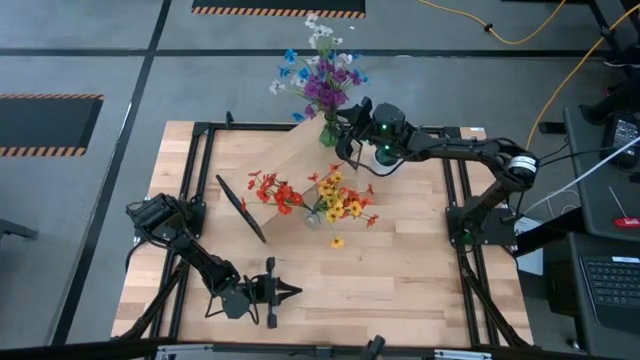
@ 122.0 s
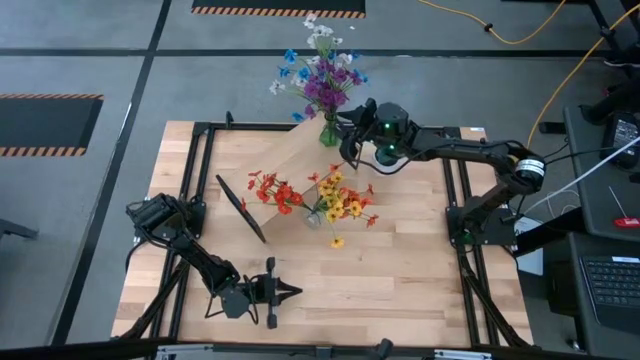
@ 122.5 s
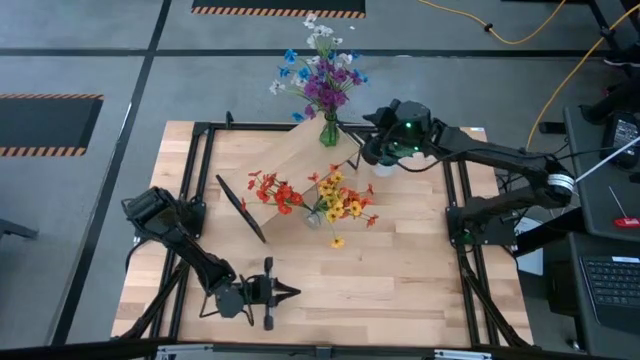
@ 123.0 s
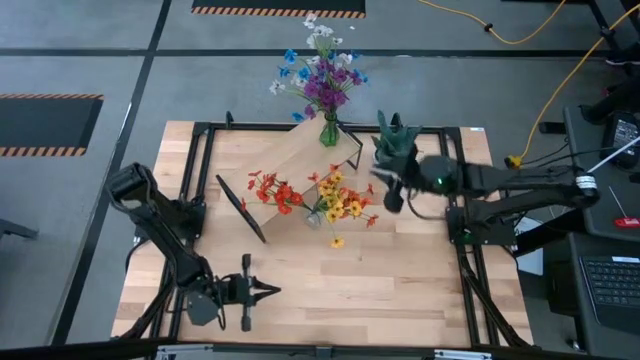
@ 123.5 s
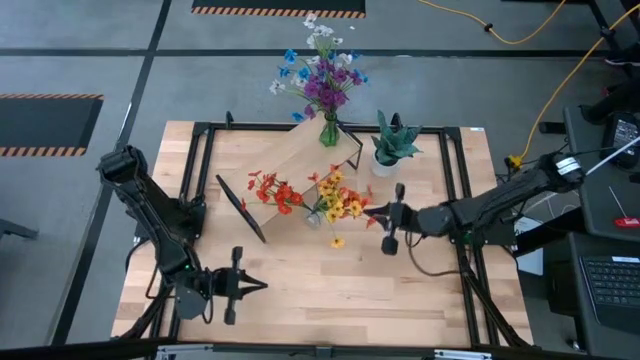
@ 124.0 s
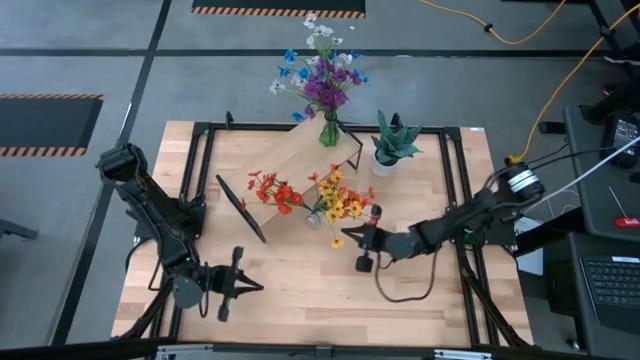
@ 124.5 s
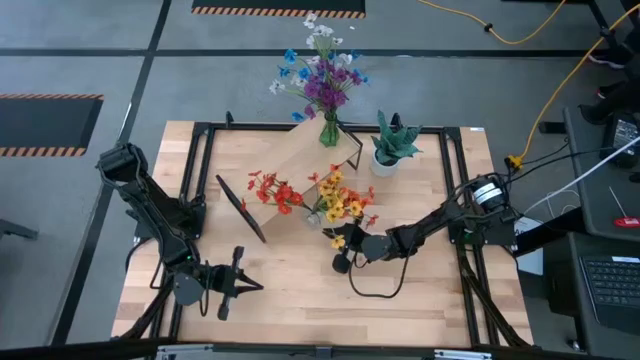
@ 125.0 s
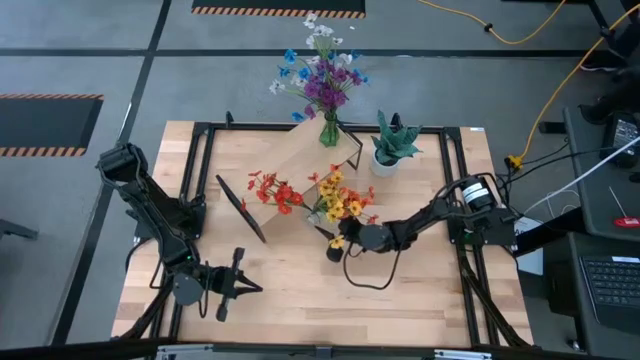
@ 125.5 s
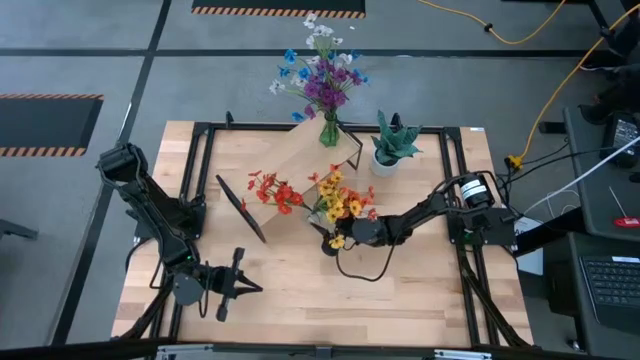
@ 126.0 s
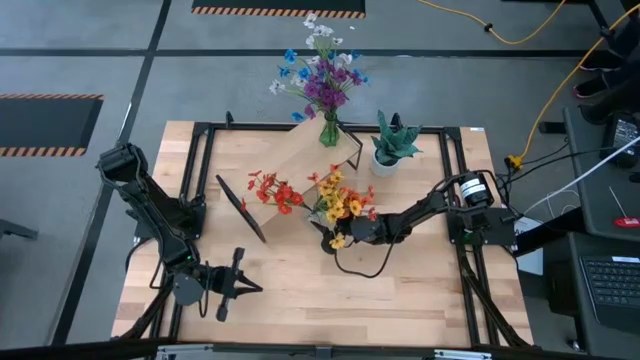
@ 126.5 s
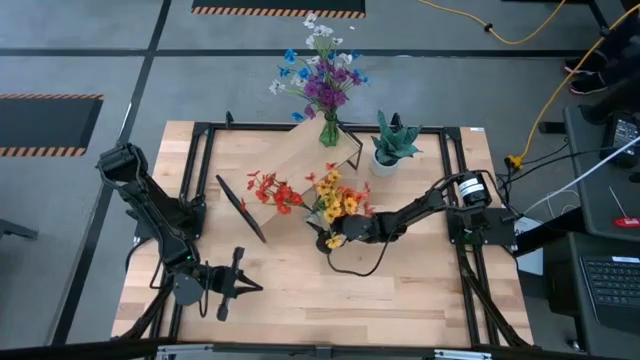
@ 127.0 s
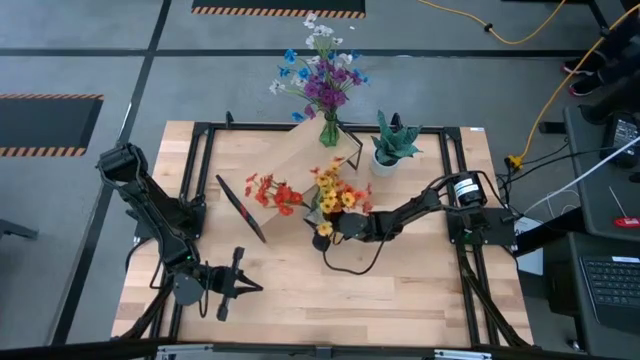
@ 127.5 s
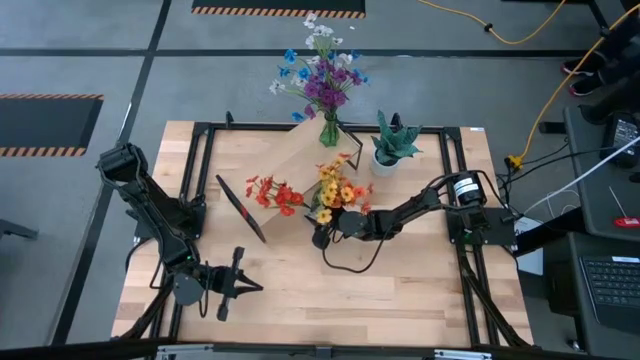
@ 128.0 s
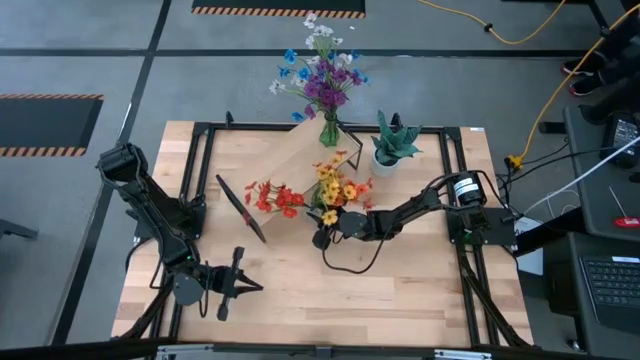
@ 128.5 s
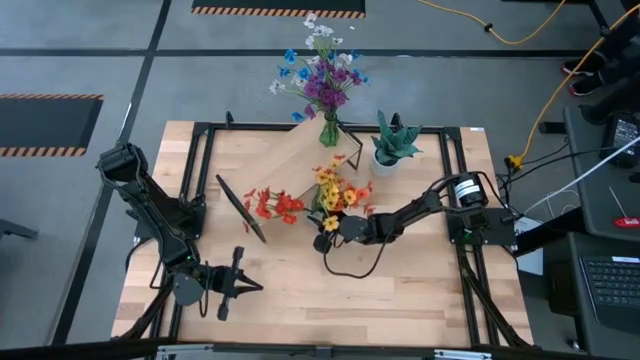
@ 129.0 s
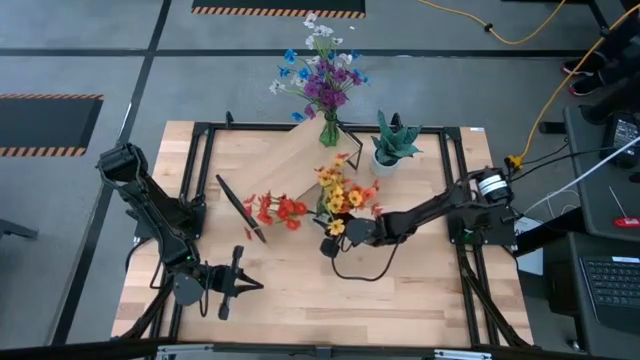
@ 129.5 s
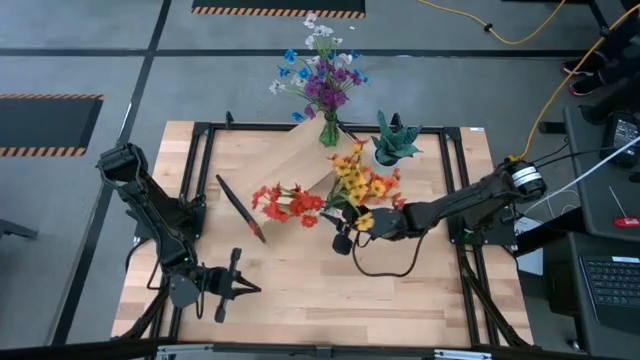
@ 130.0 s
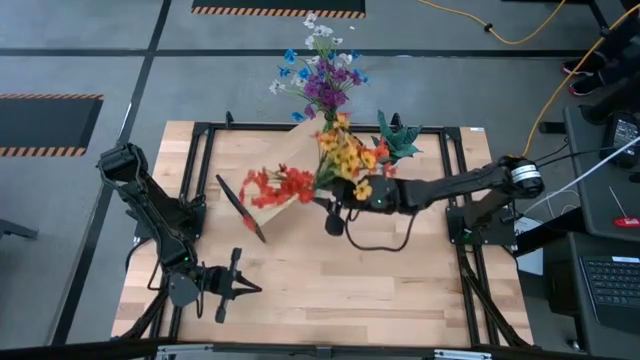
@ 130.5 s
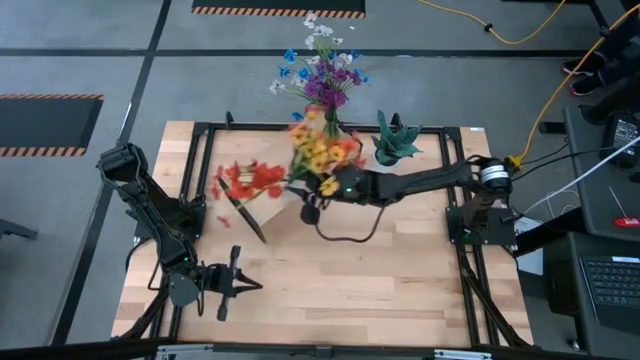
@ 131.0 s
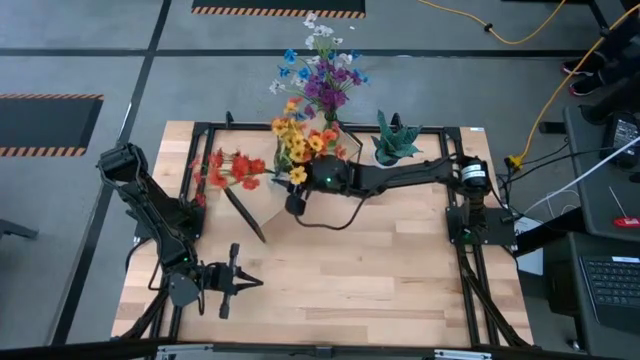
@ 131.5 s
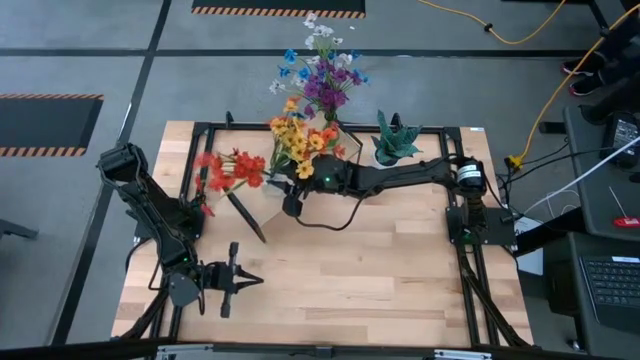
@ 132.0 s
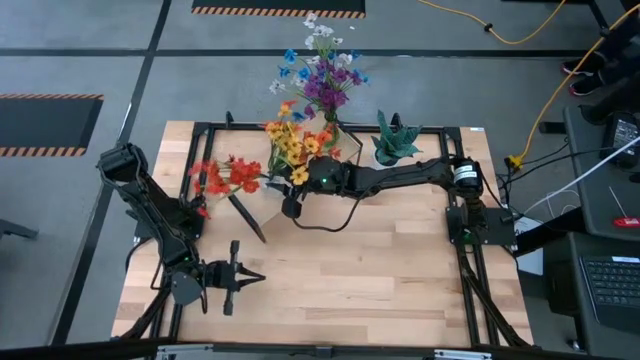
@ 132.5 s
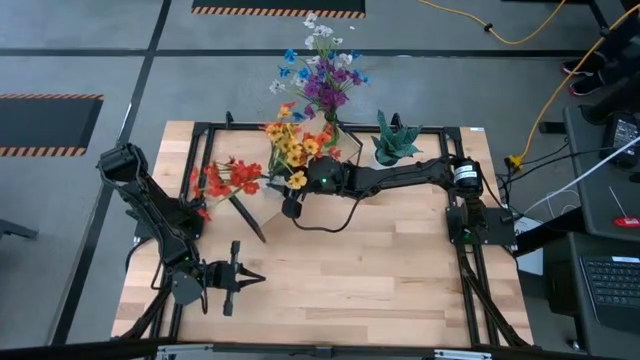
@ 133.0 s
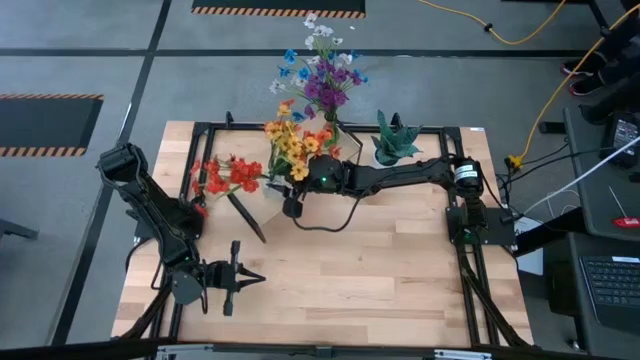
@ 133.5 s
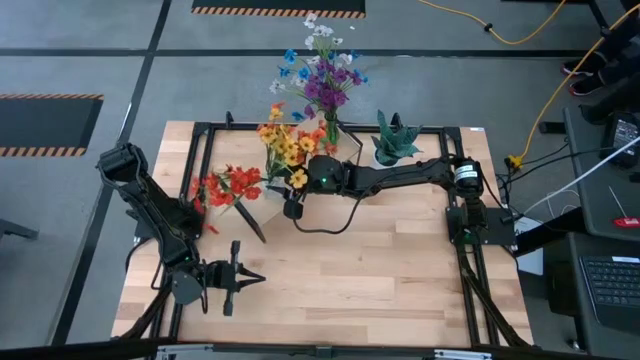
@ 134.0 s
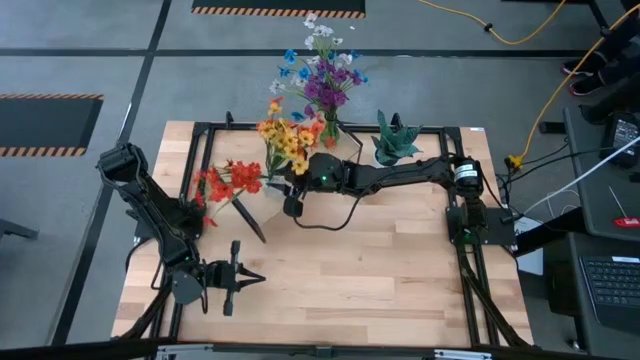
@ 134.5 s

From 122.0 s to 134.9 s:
Task: Pick and place flowers into a vace then onto a shelf
Put the transparent vase with flowers on the shelf

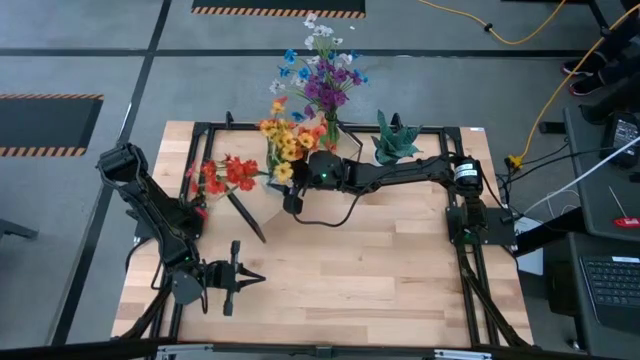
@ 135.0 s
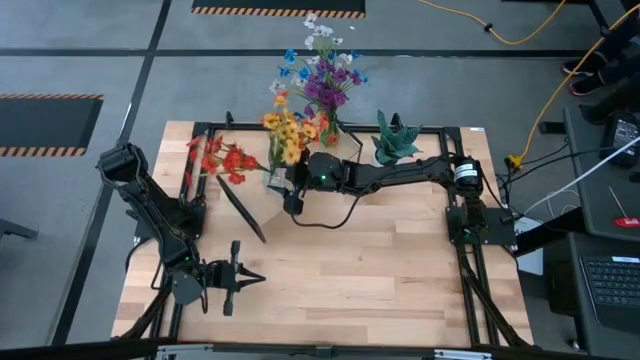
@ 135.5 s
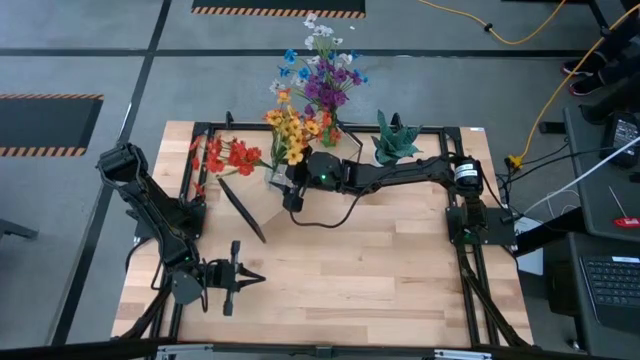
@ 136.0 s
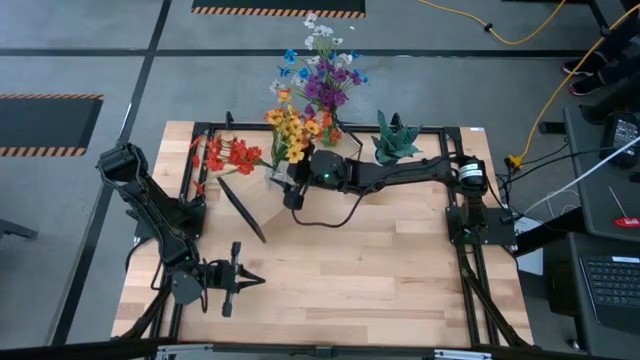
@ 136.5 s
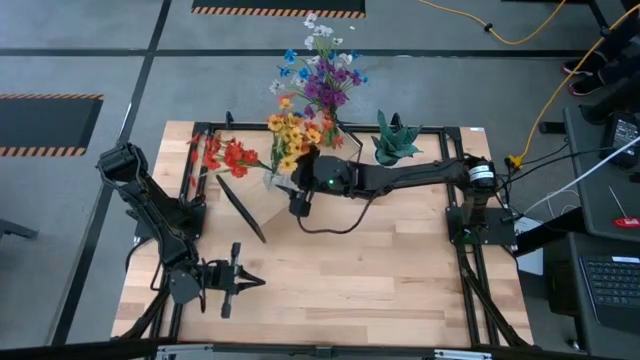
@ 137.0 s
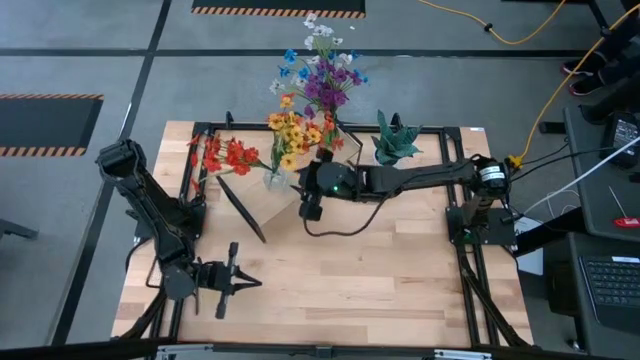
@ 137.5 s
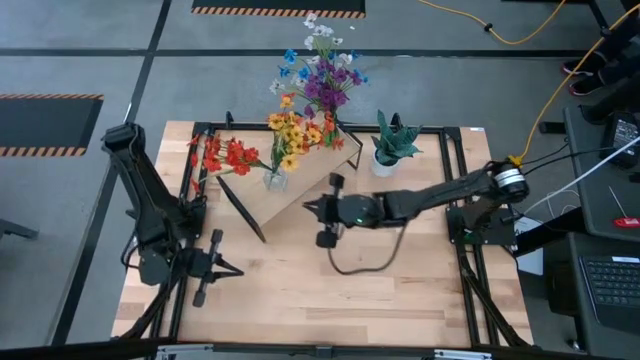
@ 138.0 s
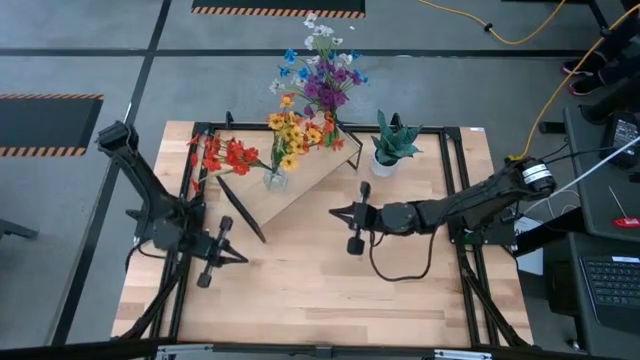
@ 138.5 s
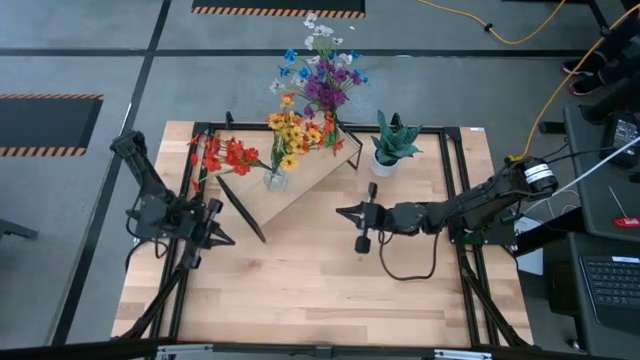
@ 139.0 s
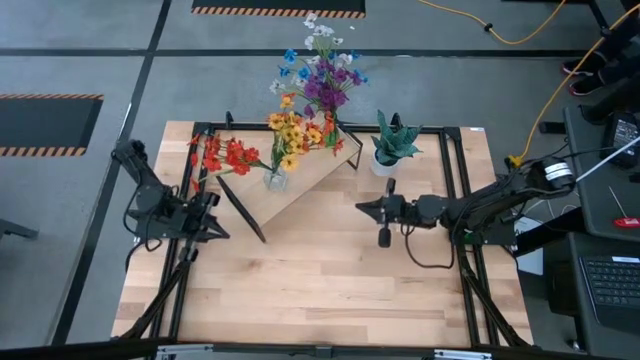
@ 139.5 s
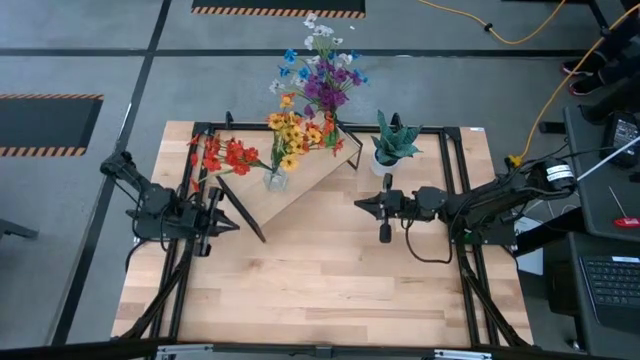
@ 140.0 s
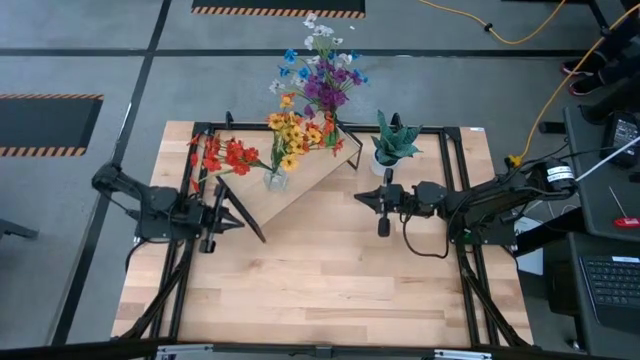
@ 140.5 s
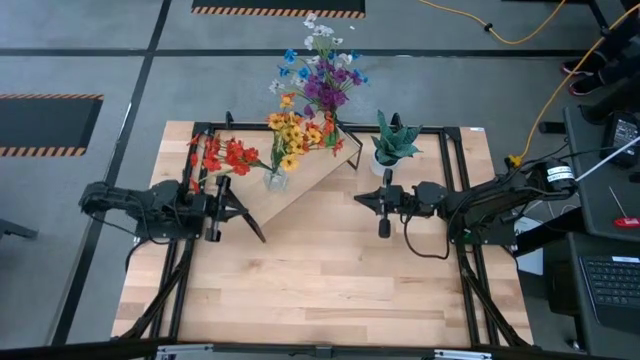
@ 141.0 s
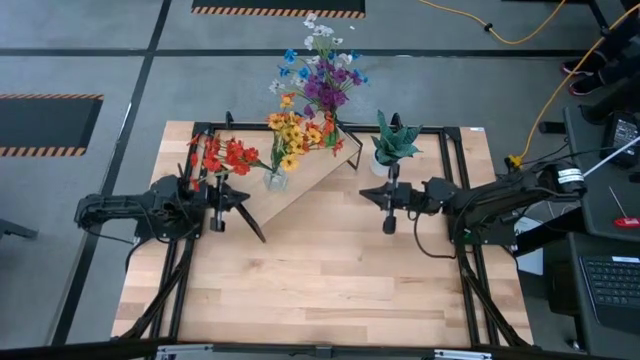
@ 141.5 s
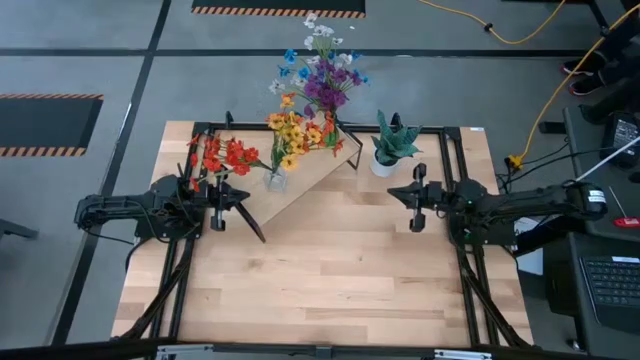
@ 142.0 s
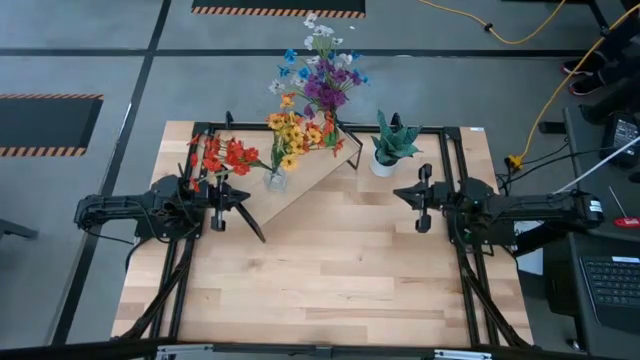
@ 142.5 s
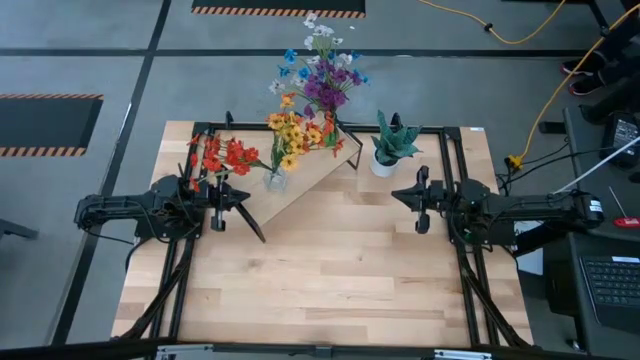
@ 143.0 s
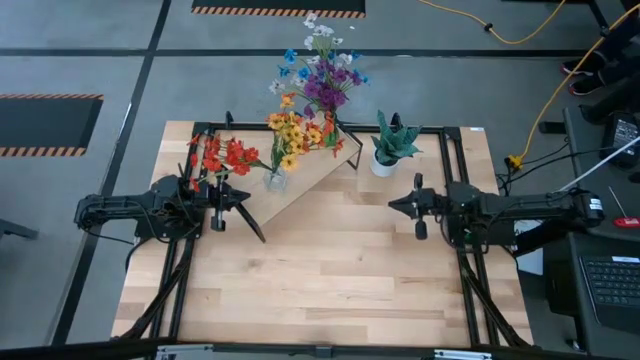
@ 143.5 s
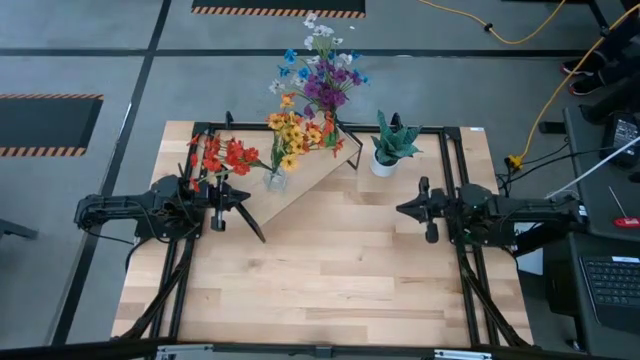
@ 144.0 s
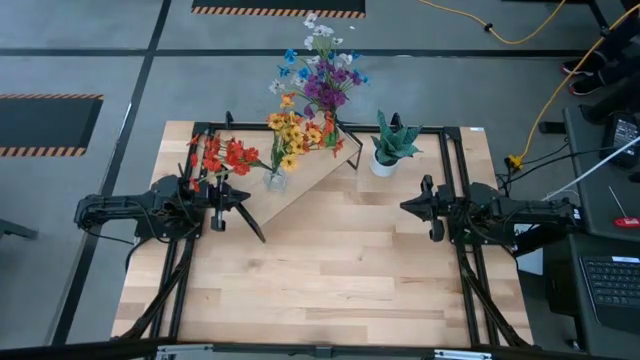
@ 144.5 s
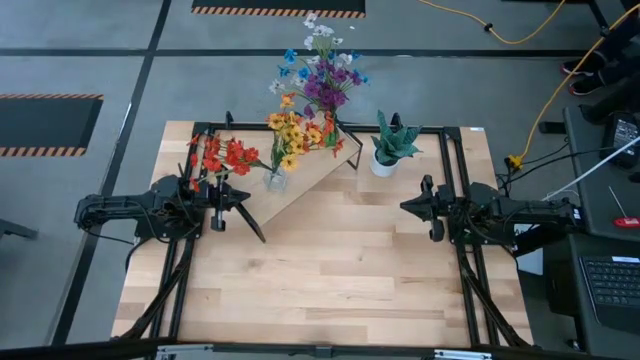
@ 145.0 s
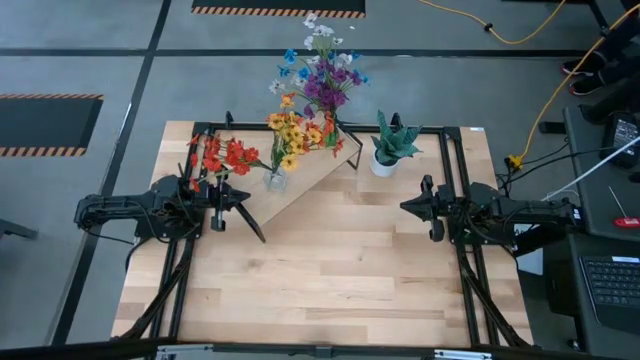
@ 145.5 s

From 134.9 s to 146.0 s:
Return to Home Position
